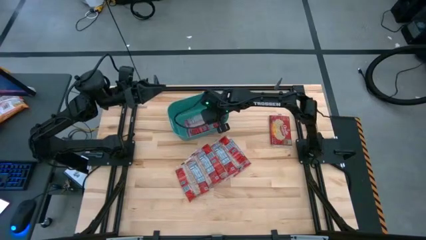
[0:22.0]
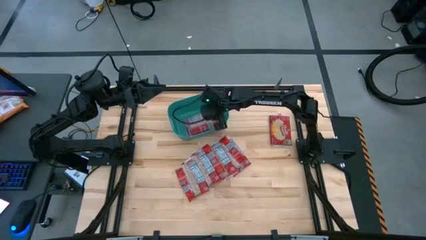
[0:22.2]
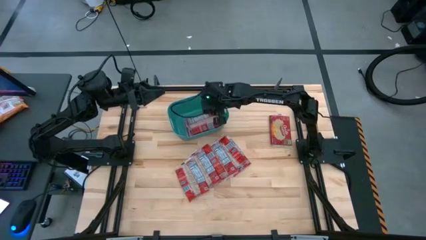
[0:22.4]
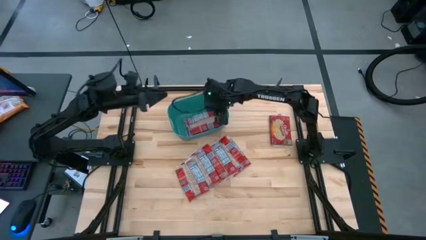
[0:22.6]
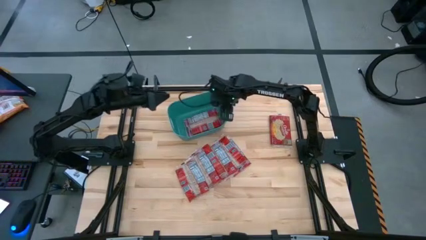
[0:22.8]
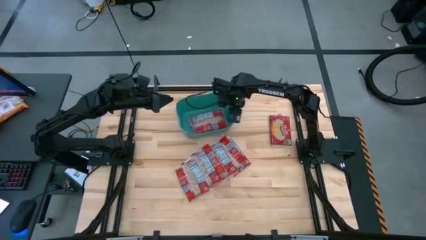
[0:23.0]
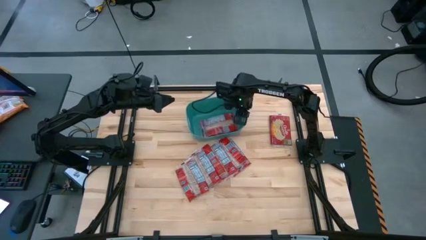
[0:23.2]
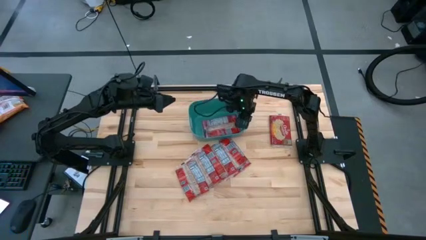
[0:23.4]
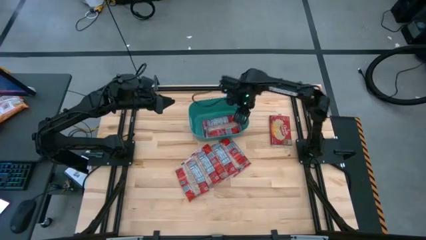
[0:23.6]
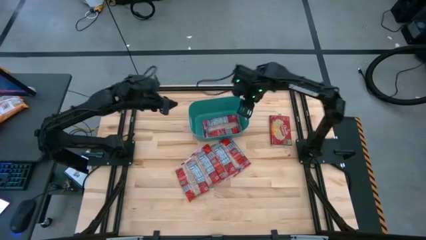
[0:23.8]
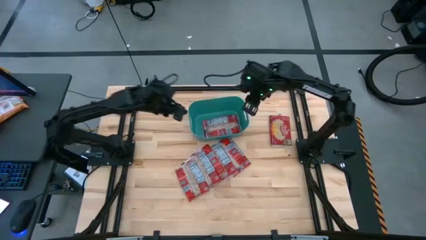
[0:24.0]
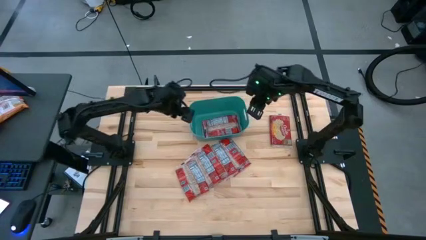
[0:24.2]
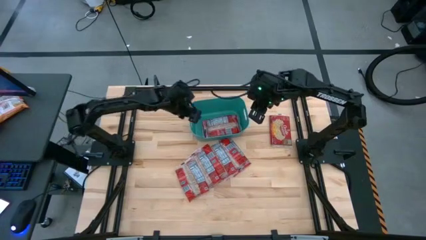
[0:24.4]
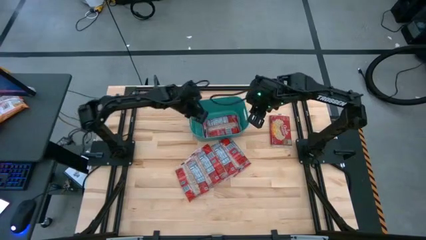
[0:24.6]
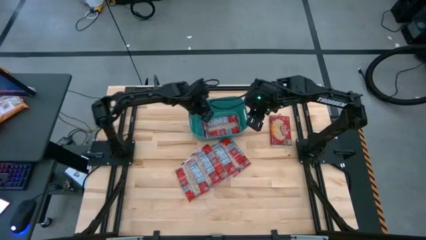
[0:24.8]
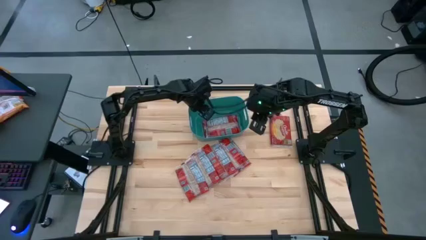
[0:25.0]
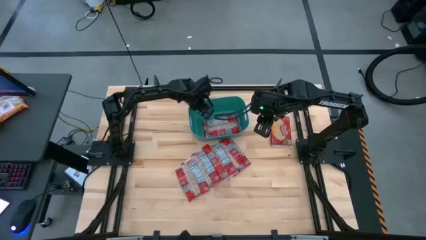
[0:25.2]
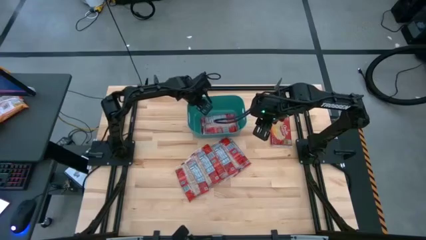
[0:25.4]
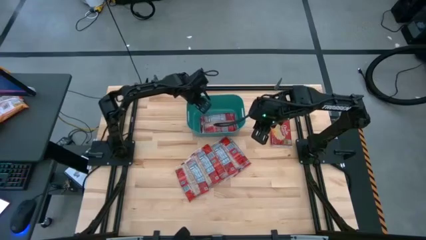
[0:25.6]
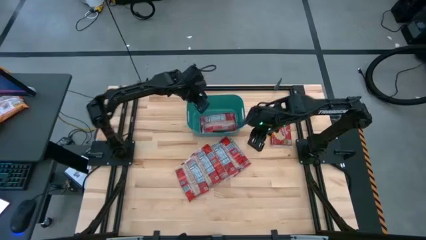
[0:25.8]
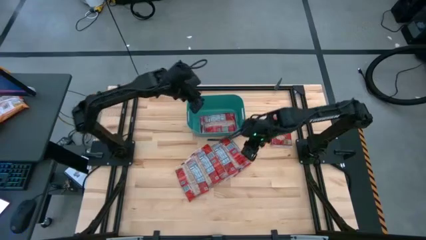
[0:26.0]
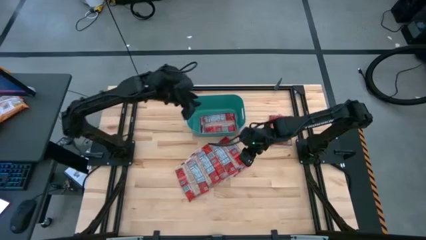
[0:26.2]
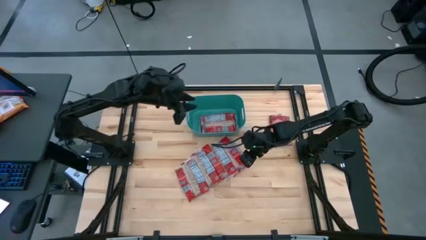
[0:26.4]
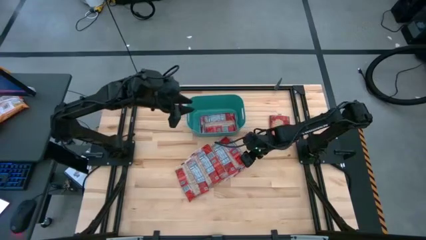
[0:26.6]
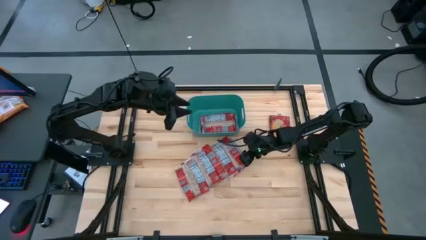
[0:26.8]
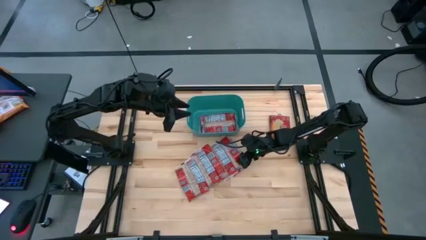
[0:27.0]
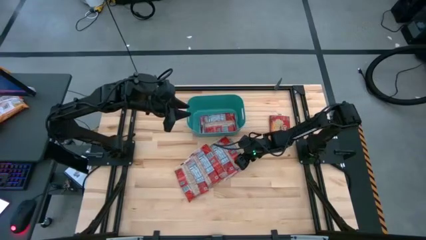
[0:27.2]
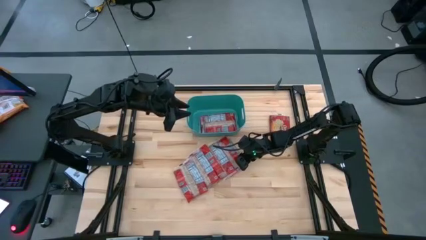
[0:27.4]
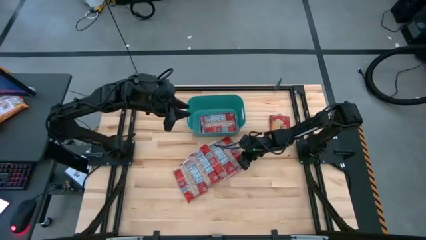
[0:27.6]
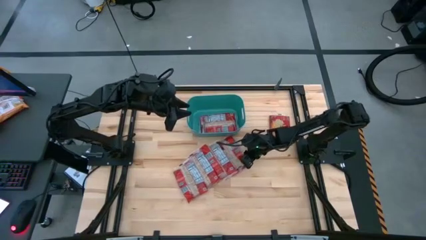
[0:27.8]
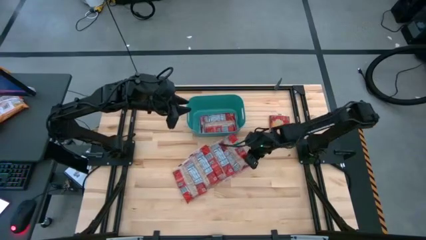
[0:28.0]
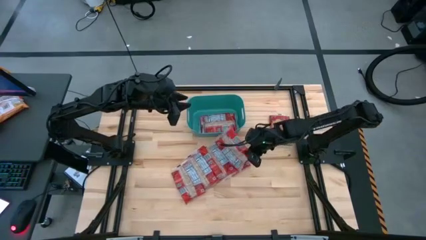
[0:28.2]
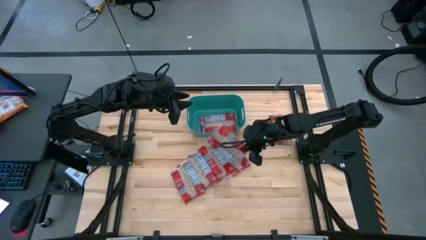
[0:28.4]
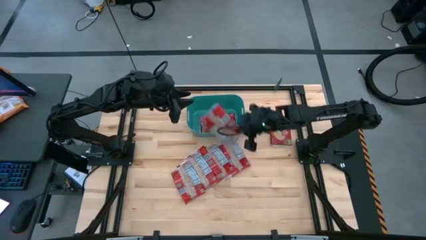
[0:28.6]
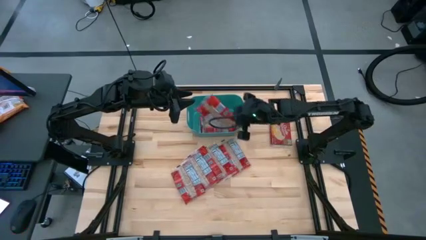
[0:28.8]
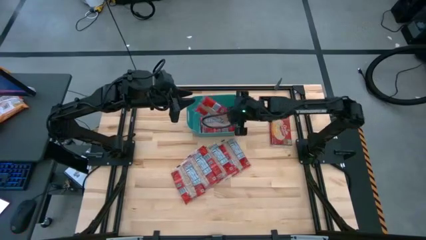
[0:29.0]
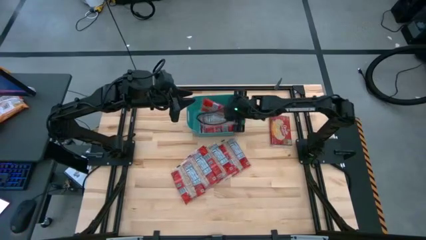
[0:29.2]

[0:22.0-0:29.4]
Task: Sort popcorn bags into baskets
Put the red popcorn bag into the blue bin

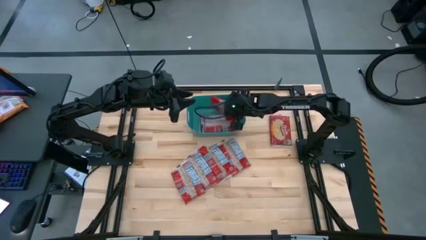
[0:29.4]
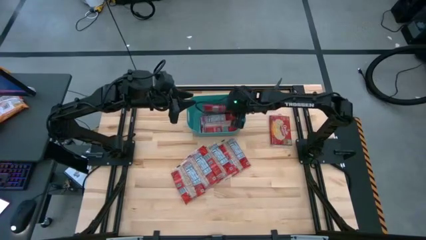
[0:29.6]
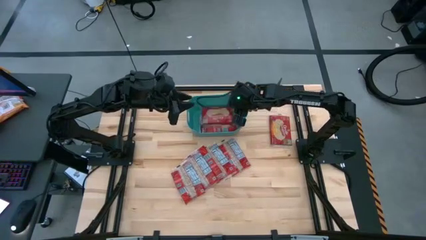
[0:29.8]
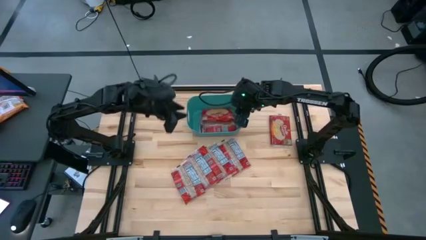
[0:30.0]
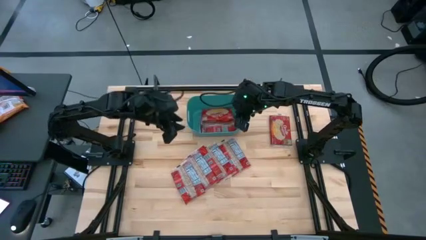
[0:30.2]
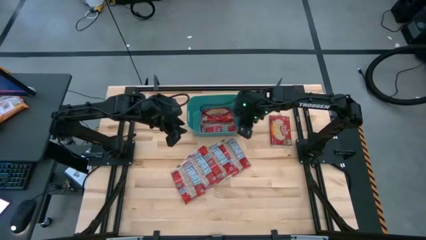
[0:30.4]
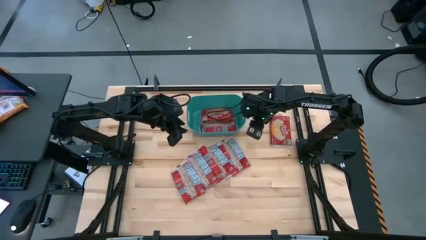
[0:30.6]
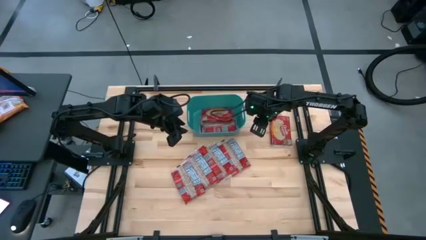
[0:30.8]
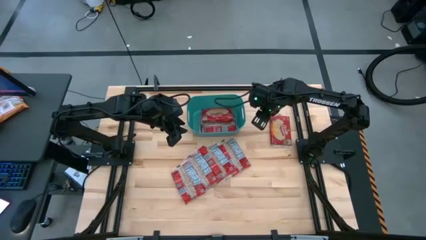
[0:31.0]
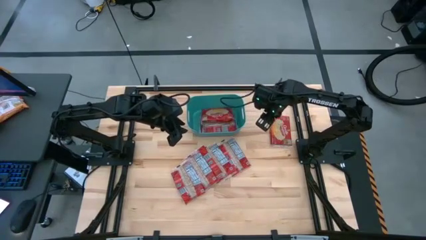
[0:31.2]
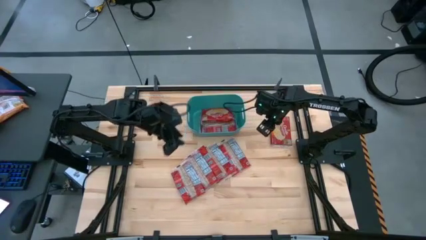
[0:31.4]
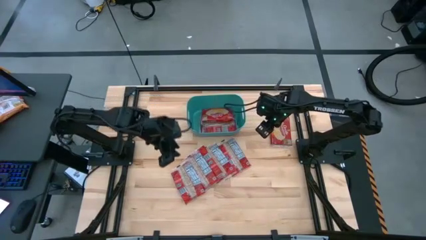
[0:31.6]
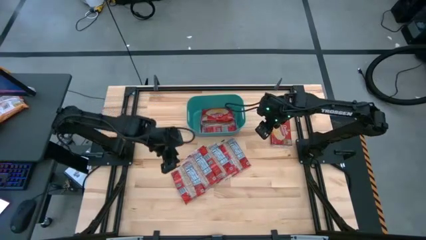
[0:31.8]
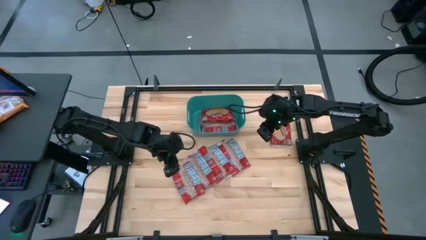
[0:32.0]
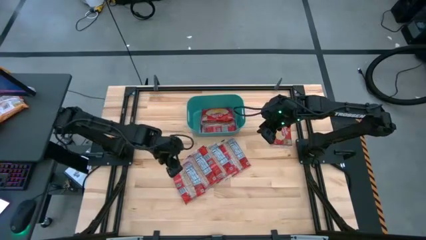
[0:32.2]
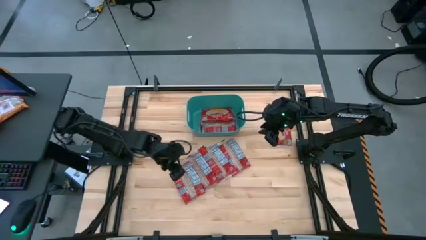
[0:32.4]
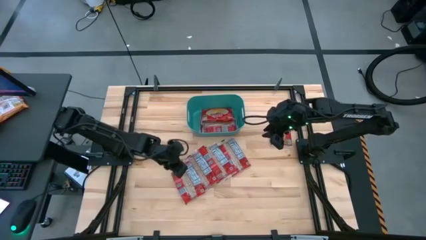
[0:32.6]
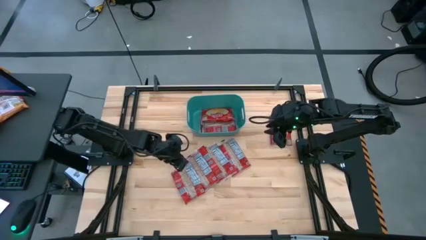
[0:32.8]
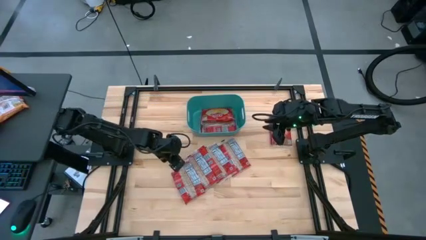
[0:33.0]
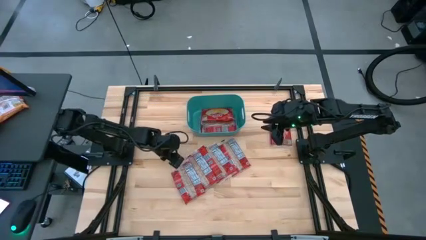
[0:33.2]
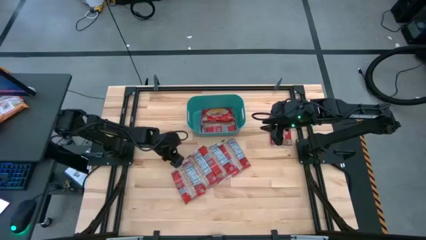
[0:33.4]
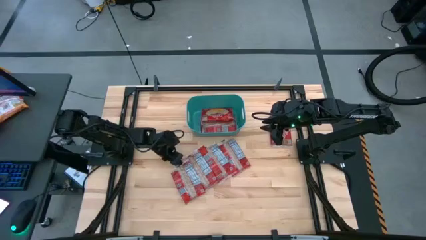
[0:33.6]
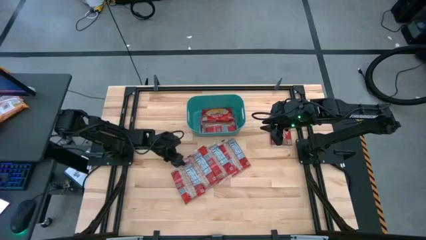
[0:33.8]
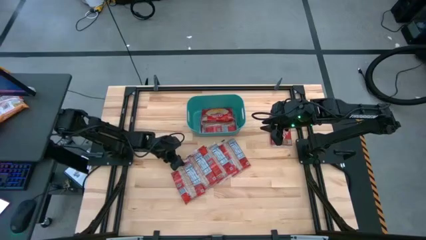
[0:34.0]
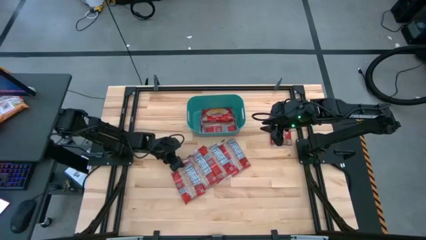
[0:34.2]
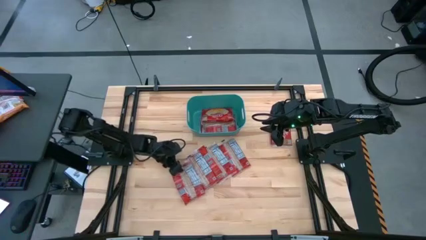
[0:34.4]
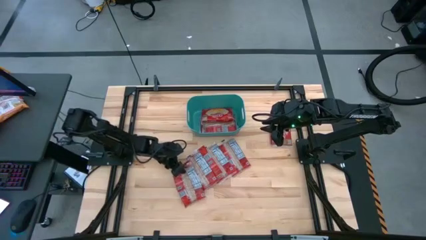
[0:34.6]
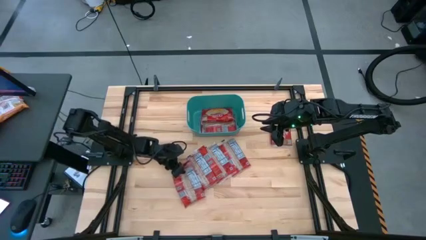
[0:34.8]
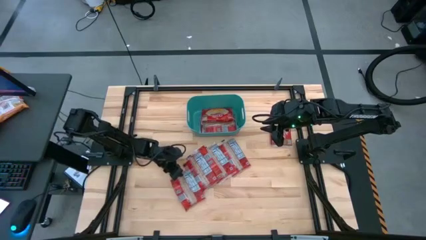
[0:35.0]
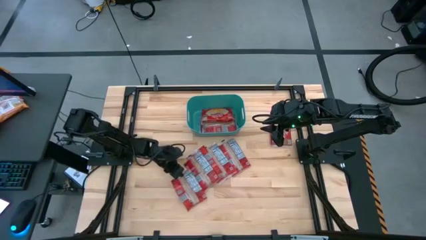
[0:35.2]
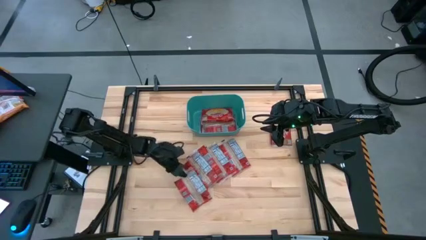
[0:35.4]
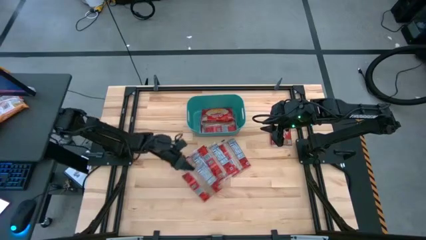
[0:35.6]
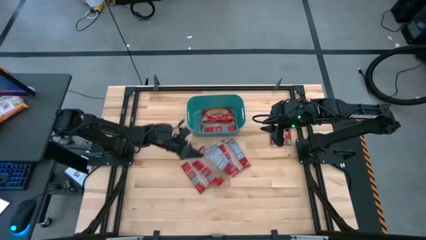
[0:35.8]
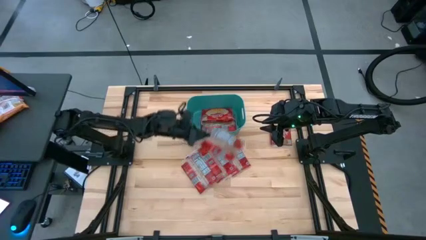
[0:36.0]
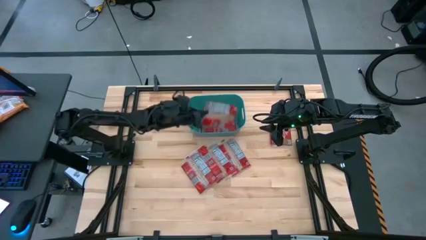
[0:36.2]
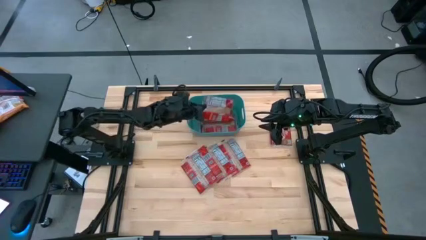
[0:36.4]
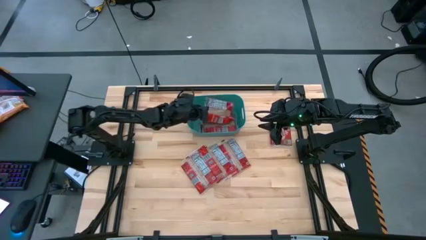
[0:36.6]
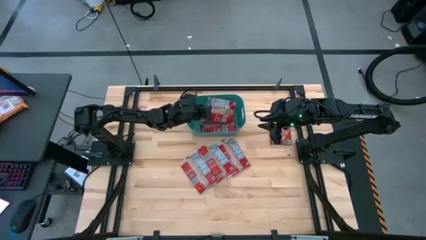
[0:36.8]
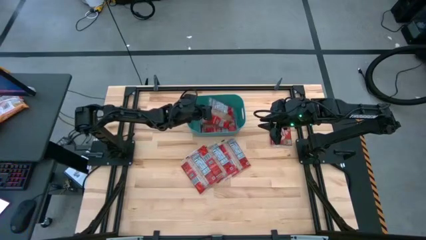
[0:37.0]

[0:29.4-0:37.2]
Put the red popcorn bag into the blue bin

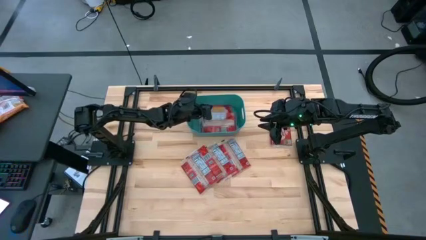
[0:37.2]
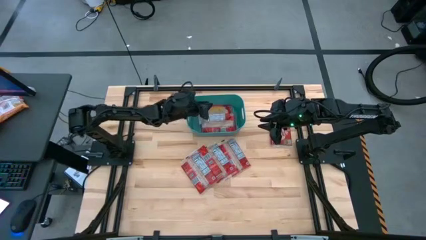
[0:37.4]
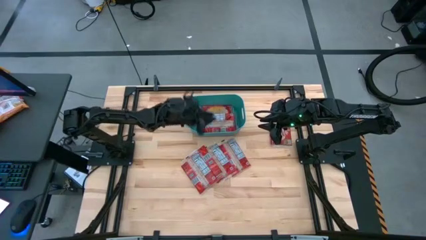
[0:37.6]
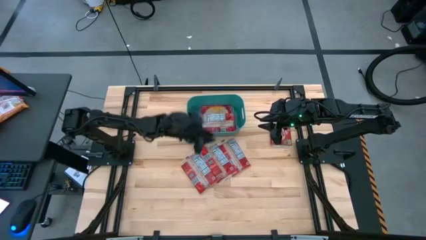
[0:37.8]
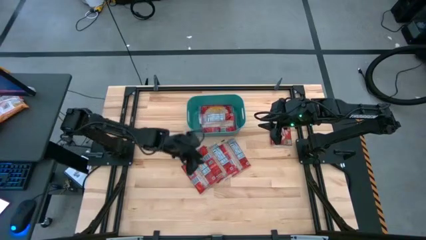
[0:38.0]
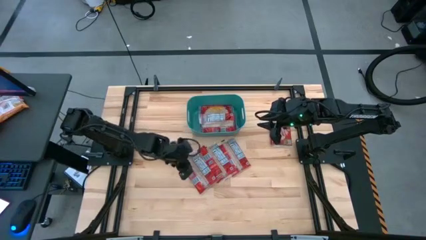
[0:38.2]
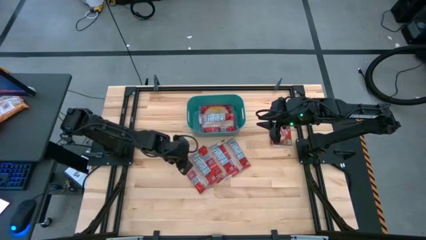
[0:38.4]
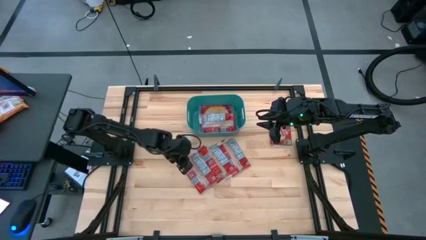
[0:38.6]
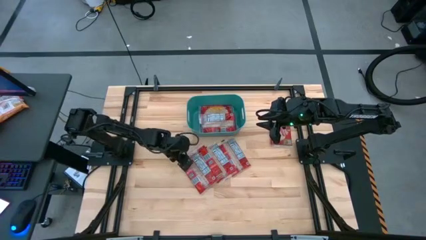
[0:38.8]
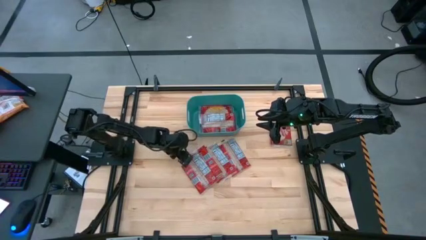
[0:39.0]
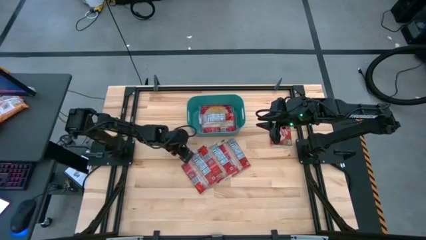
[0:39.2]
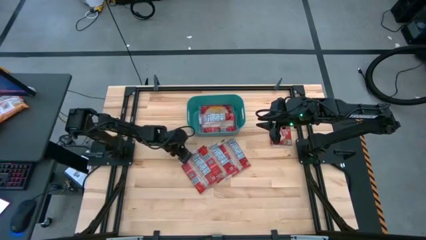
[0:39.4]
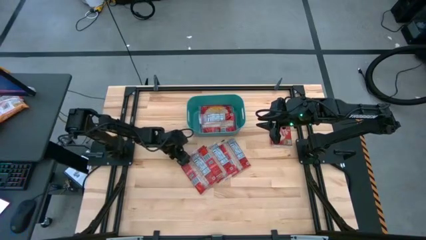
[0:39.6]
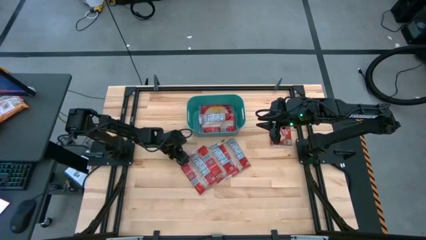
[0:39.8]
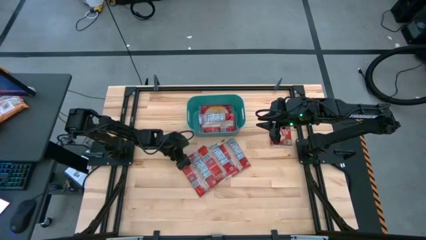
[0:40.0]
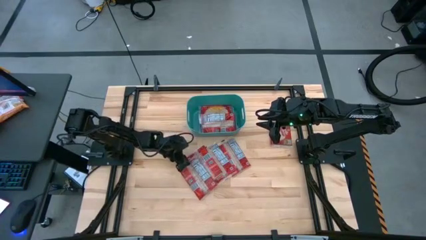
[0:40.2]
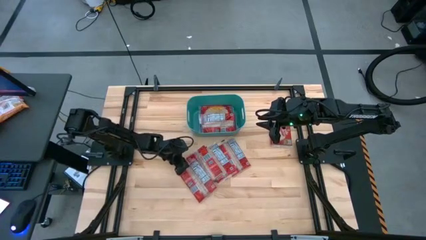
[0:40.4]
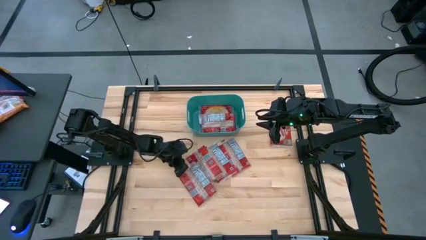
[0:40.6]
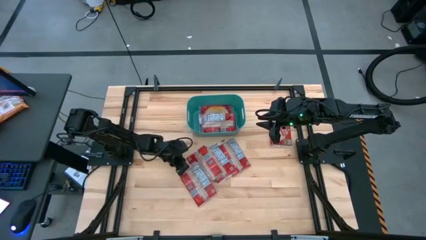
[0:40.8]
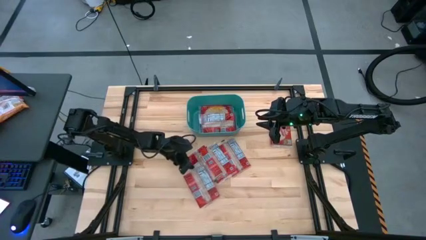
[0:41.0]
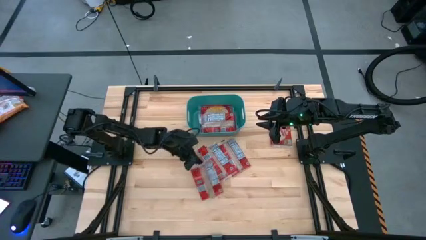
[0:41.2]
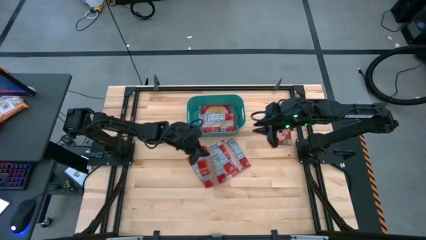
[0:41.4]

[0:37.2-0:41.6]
Put the red popcorn bag into the blue bin
